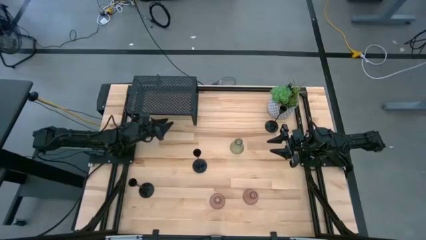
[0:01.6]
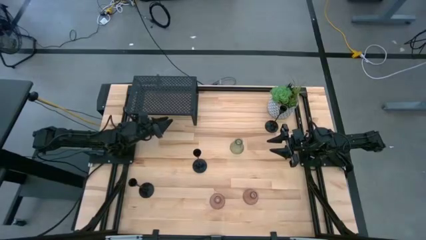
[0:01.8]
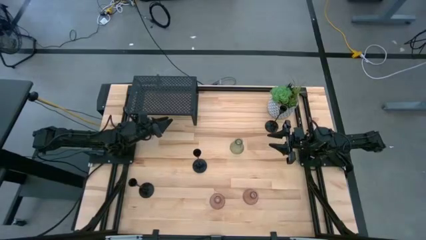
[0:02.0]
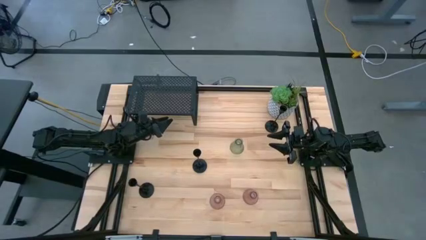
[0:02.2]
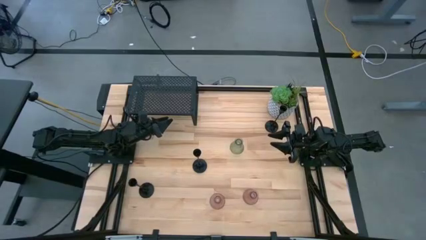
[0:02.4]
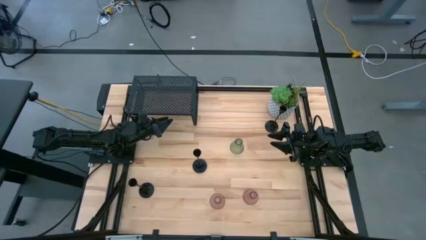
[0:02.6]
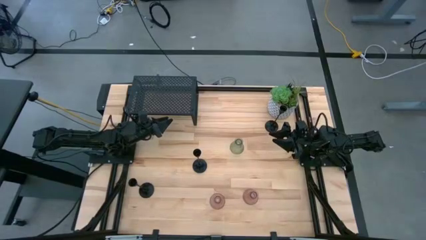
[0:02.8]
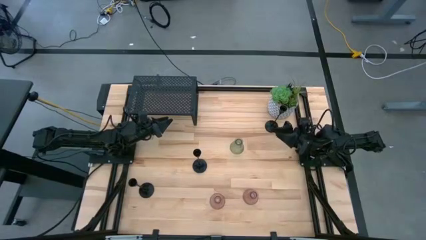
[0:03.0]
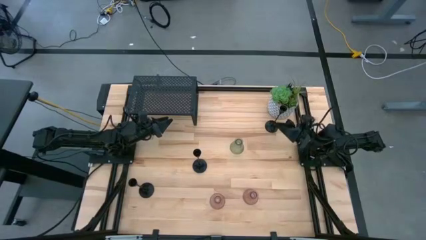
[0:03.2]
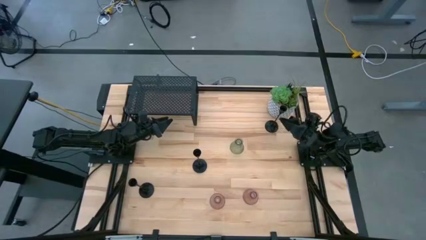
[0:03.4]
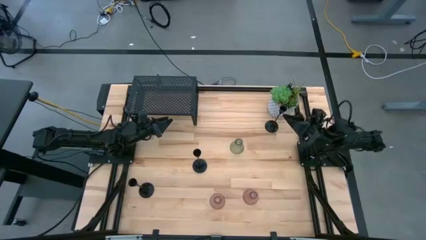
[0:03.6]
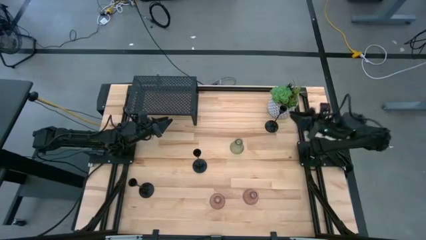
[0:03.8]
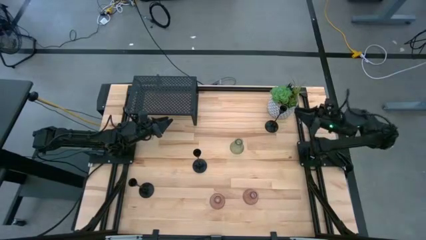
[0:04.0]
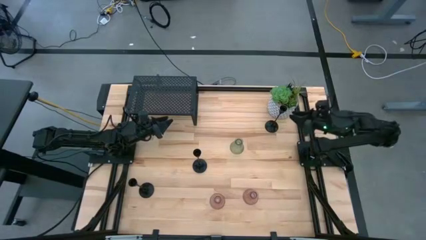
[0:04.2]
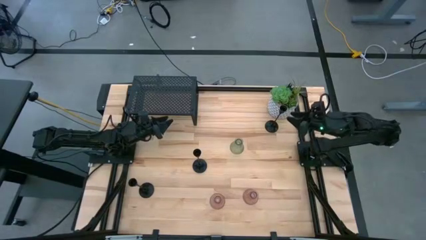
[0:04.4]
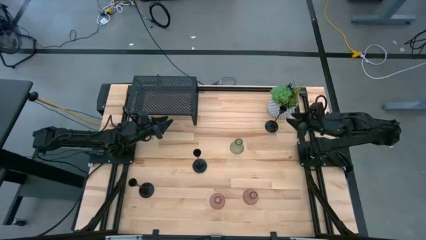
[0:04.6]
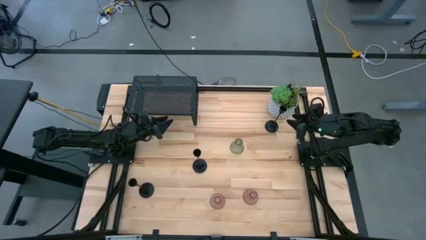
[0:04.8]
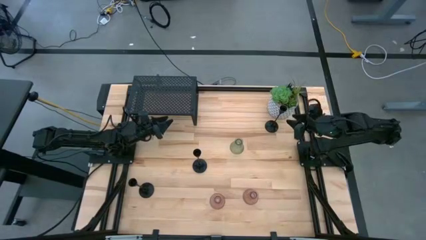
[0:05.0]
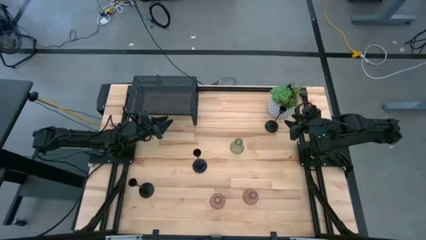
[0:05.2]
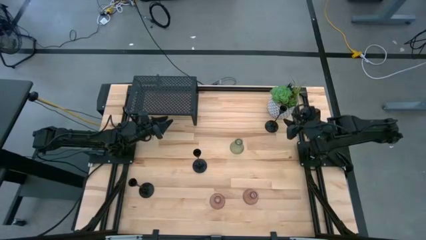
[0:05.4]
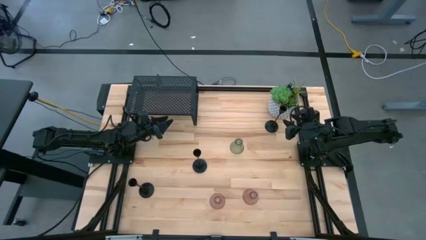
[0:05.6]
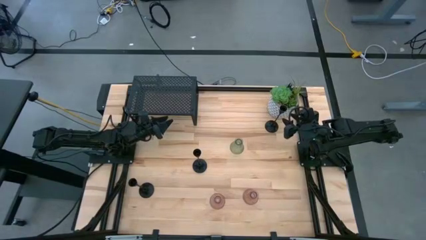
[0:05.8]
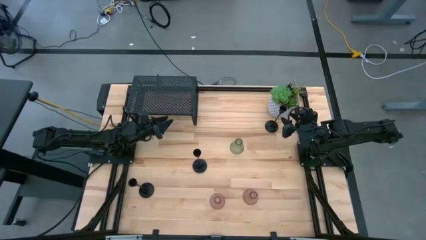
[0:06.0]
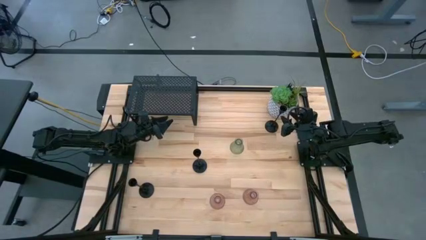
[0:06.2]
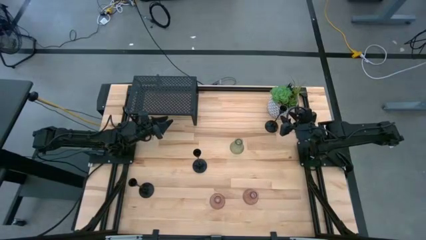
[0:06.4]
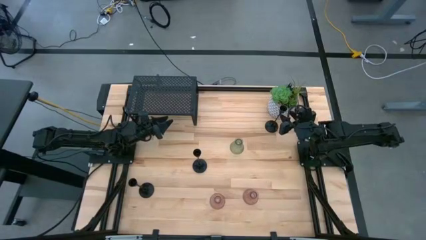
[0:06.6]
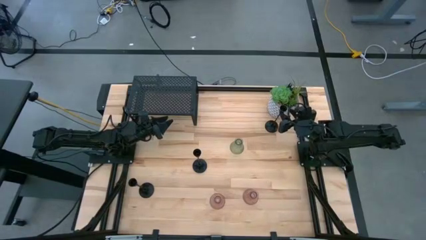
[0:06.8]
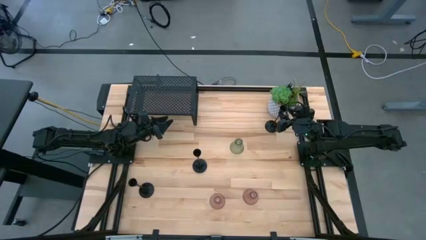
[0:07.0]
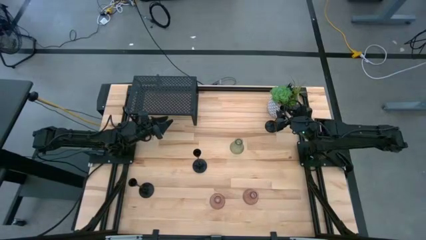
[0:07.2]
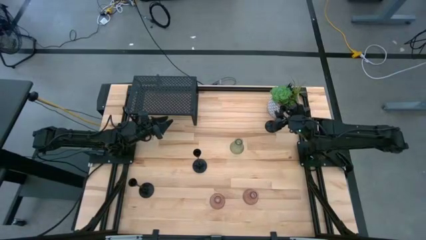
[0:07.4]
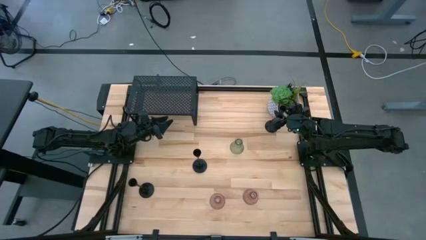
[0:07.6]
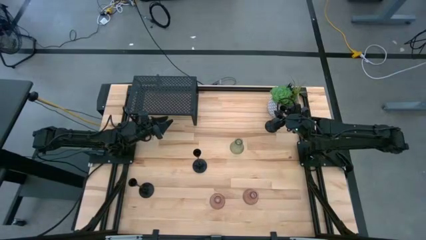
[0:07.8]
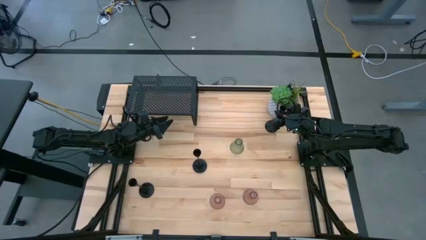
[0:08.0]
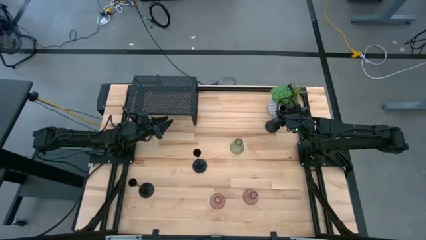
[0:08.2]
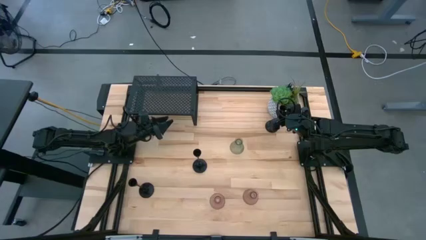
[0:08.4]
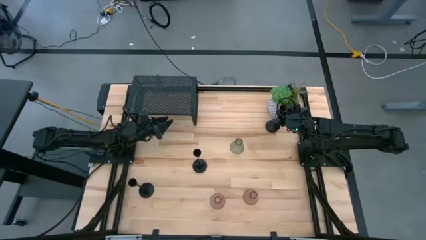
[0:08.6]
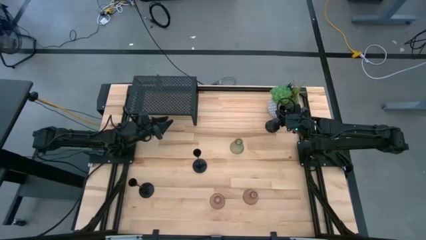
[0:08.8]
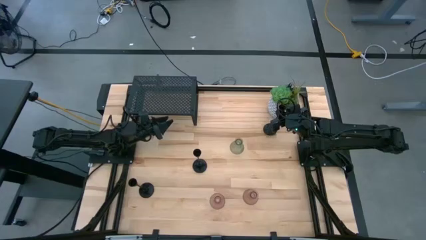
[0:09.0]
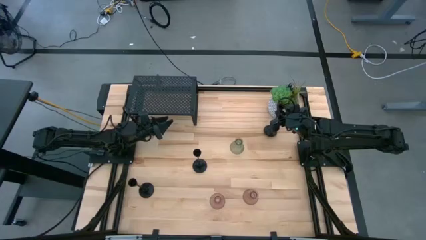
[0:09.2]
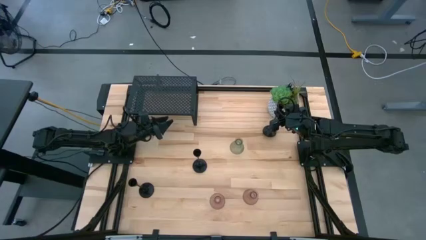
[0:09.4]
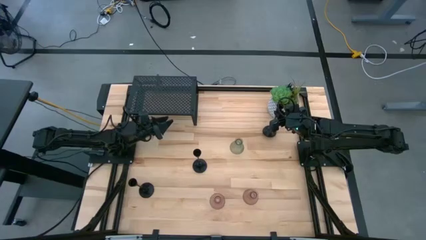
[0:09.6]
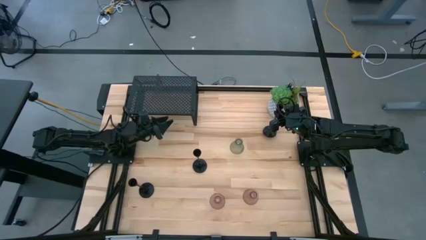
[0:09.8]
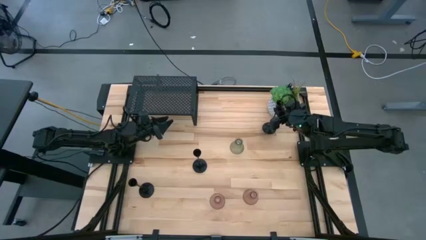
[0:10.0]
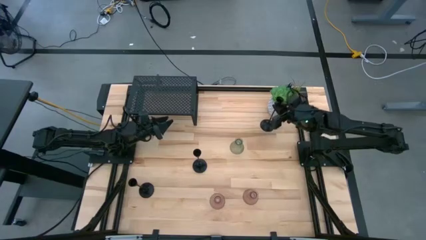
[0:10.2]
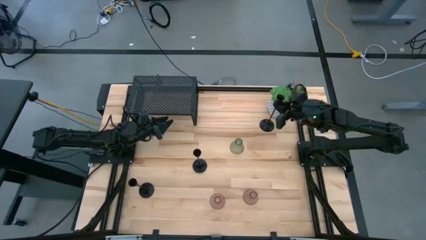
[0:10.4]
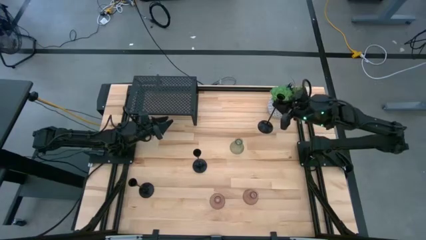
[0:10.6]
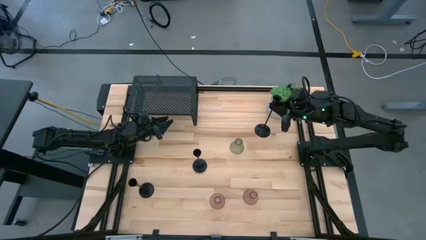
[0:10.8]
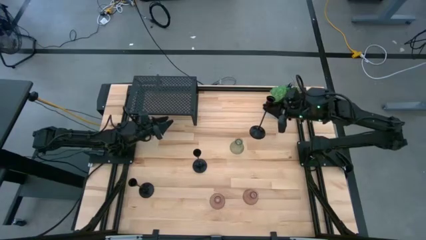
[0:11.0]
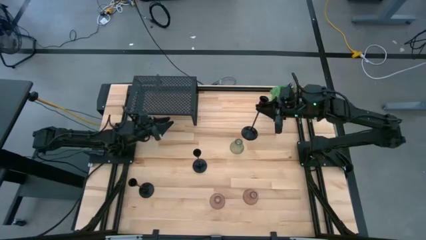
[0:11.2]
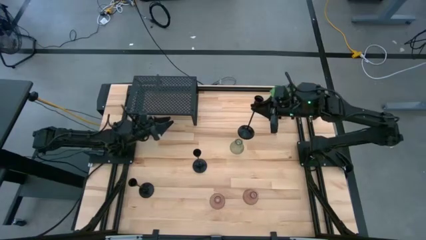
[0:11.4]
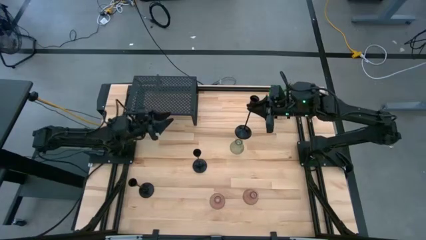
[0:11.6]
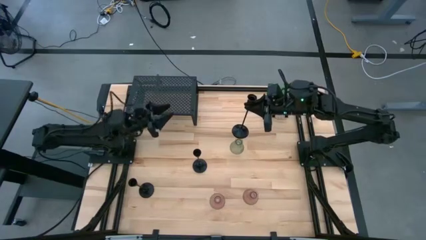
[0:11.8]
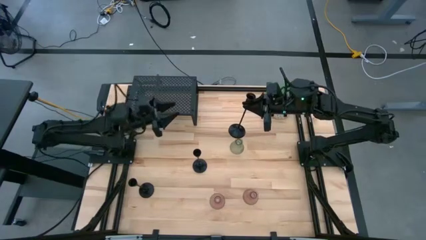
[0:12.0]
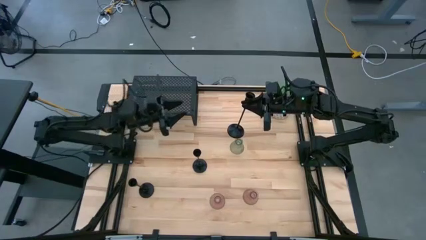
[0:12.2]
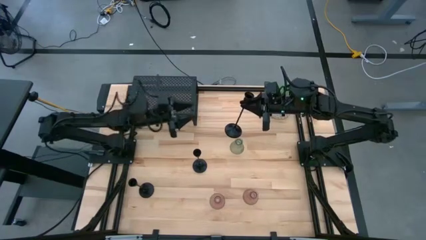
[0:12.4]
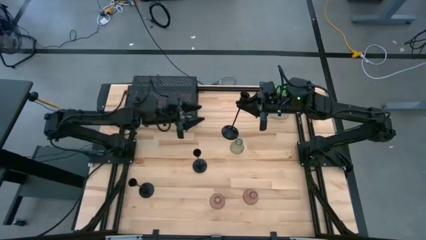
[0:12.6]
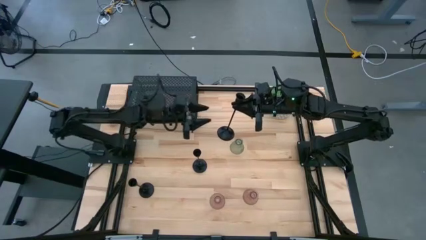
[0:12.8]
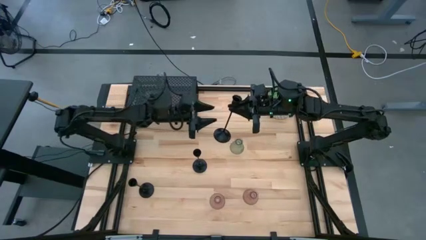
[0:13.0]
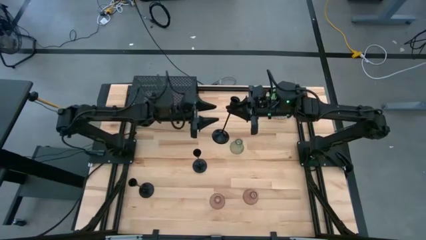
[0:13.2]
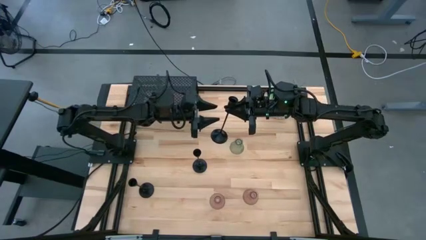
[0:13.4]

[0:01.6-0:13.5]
Task: Pick & Place candle stick holders
Put the right black candle holder on the shelf
